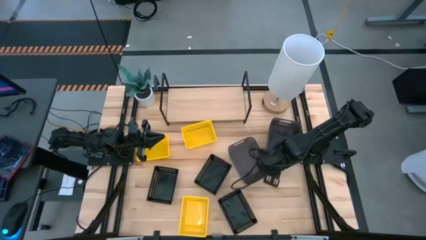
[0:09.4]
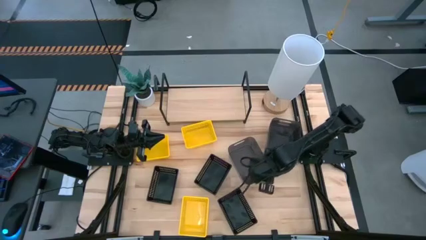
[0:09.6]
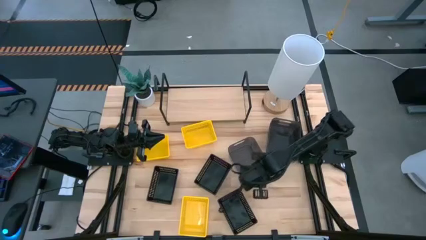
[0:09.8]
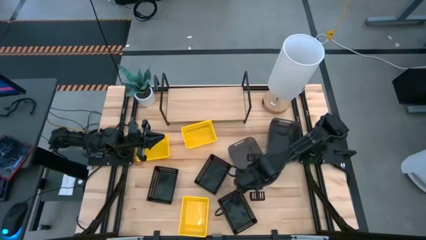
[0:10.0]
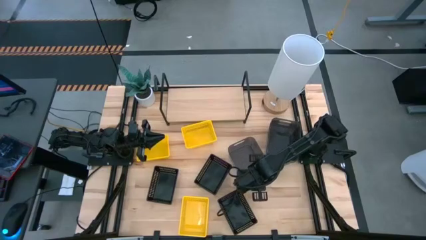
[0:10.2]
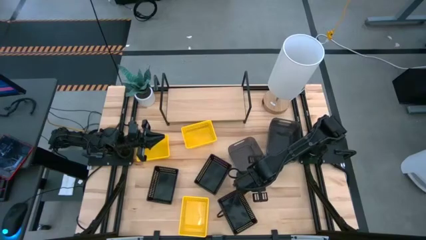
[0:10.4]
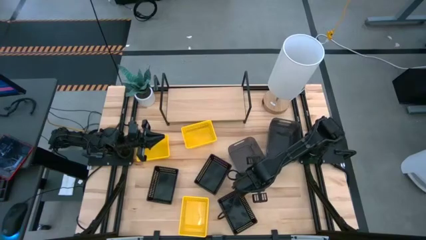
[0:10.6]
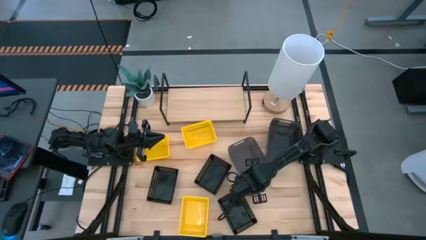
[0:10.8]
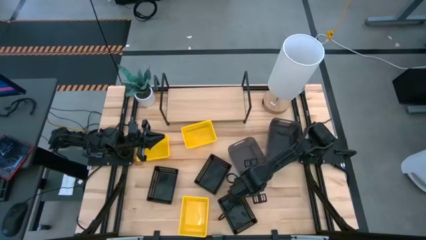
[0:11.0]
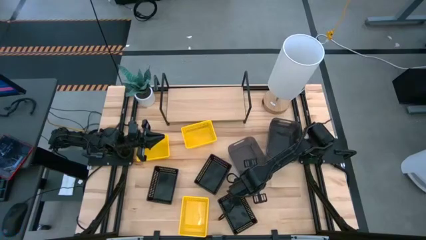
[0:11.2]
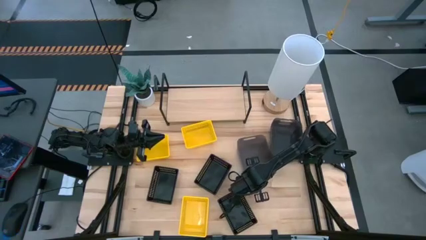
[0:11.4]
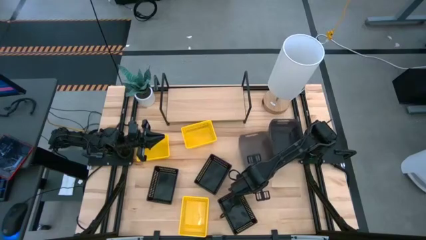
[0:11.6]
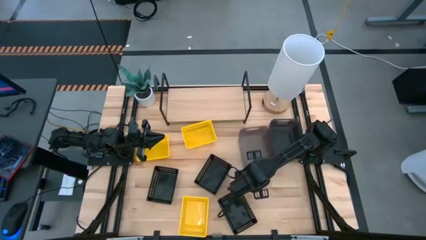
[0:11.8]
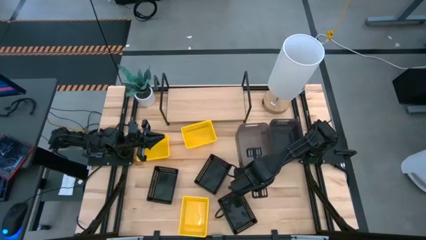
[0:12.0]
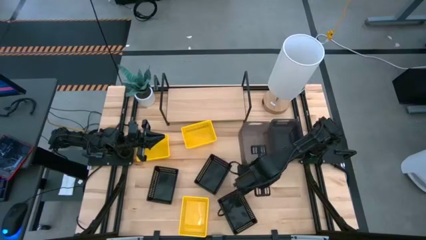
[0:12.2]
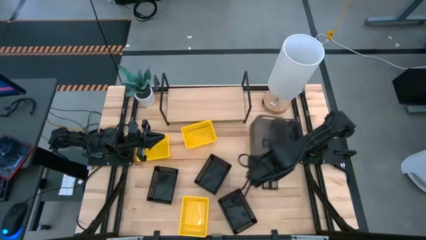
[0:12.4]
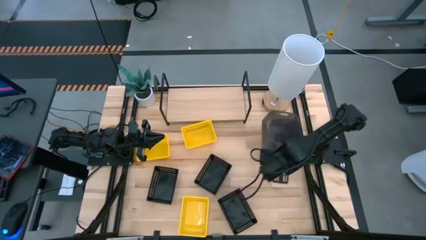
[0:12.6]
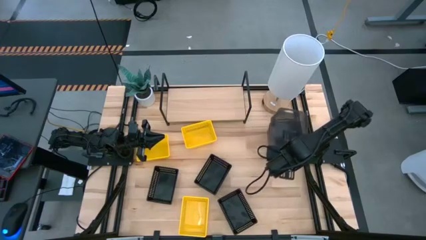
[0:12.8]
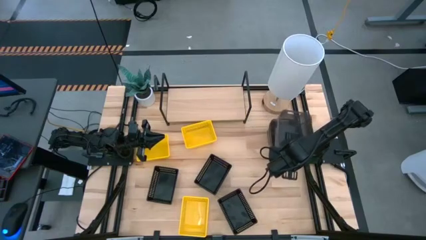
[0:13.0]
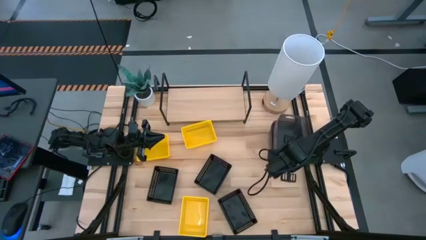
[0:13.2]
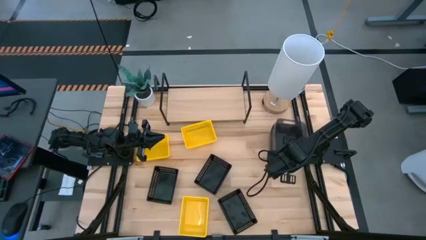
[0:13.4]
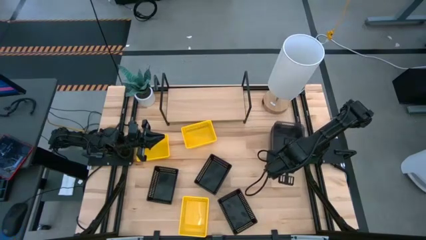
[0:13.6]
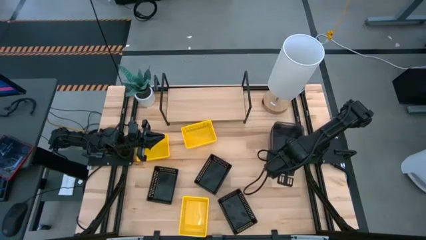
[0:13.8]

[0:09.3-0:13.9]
Task: Stack baskets on shelf by color
Stack the bottom gray bin on the gray bin

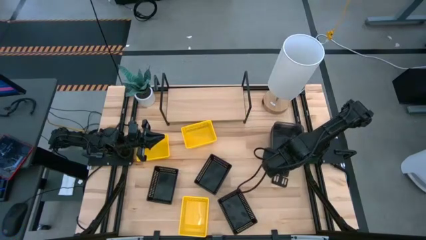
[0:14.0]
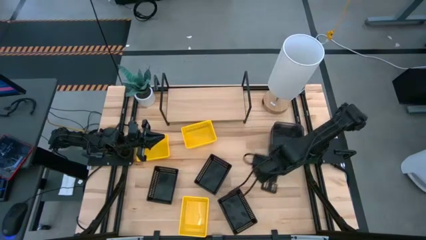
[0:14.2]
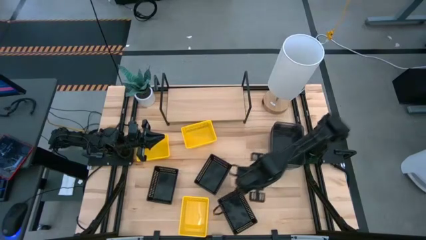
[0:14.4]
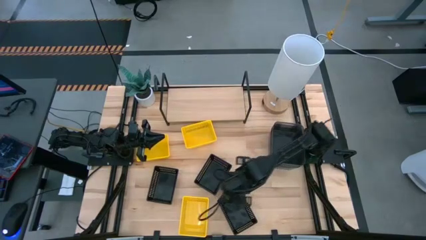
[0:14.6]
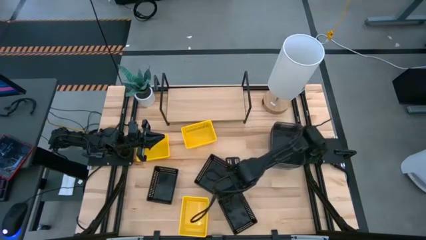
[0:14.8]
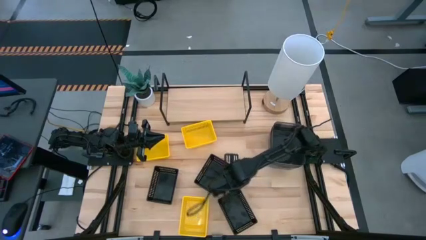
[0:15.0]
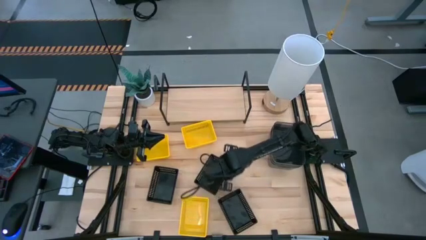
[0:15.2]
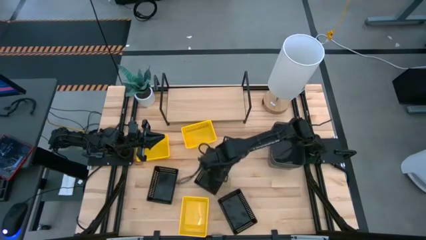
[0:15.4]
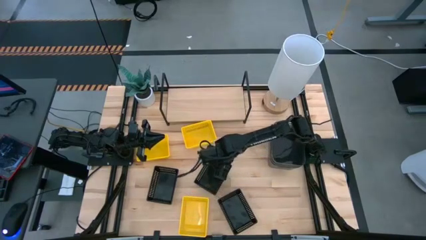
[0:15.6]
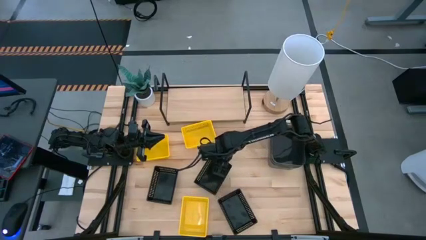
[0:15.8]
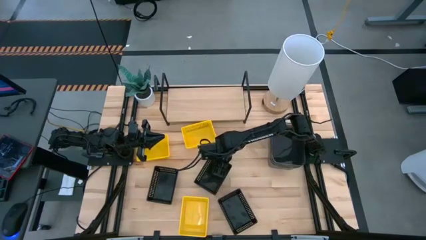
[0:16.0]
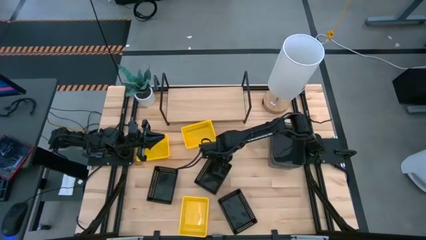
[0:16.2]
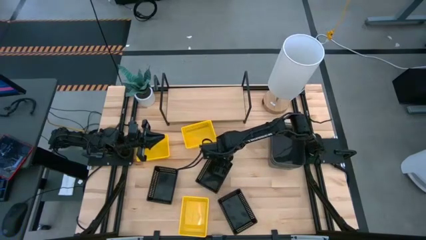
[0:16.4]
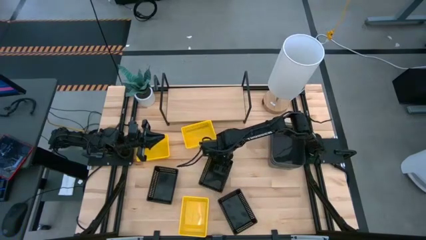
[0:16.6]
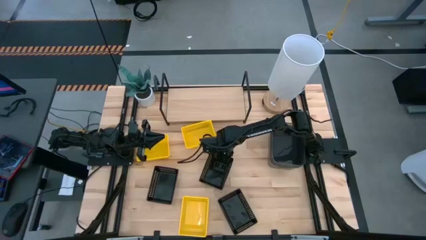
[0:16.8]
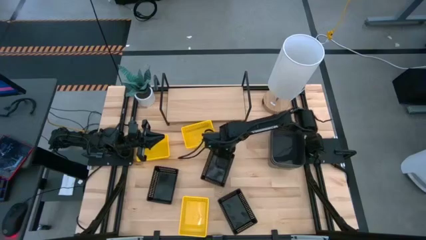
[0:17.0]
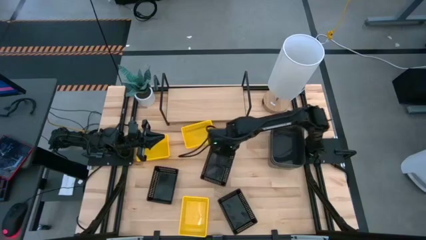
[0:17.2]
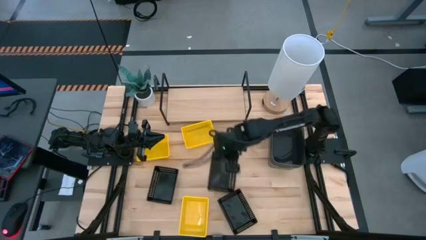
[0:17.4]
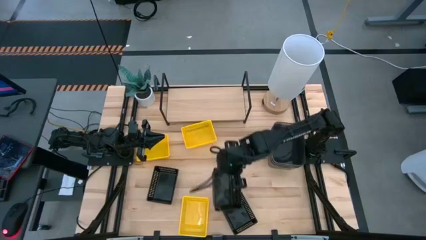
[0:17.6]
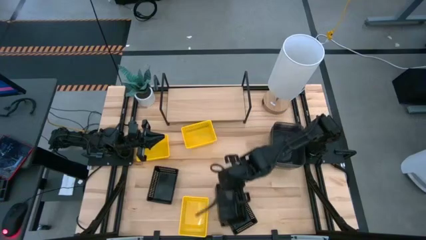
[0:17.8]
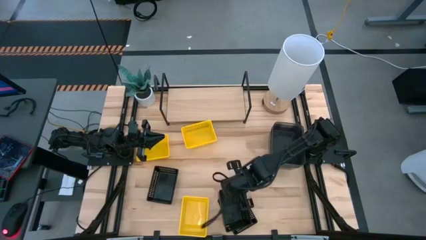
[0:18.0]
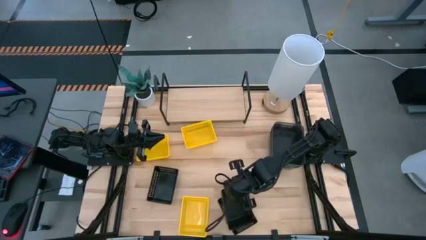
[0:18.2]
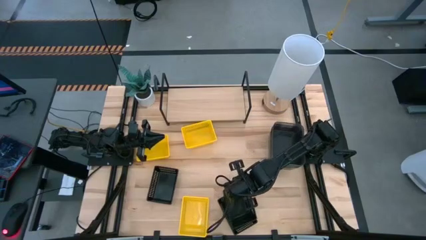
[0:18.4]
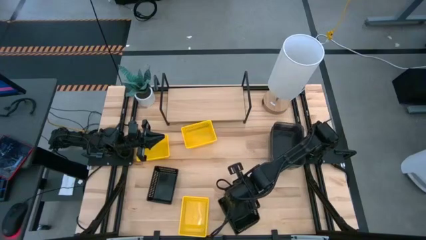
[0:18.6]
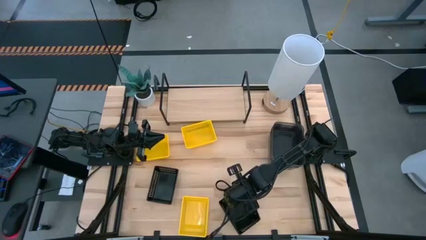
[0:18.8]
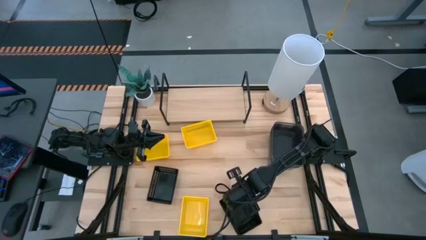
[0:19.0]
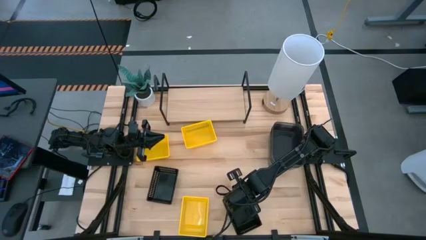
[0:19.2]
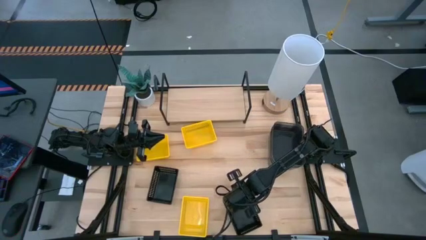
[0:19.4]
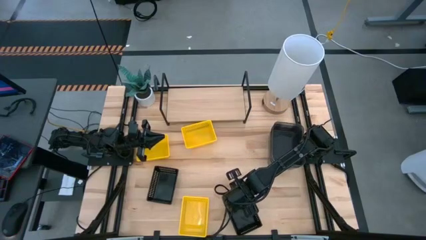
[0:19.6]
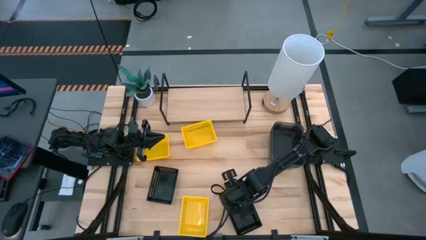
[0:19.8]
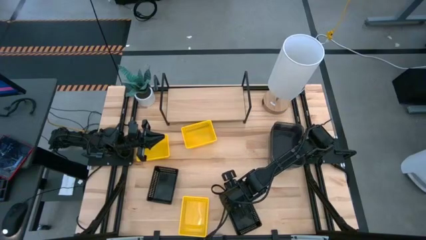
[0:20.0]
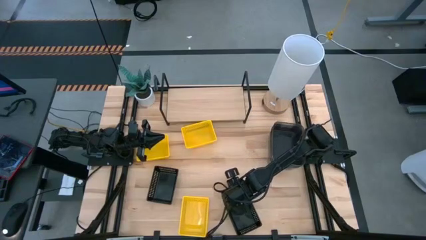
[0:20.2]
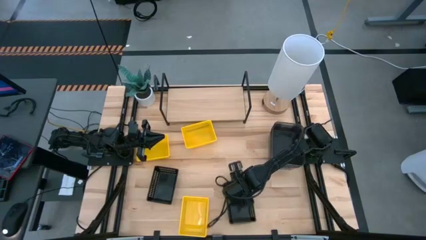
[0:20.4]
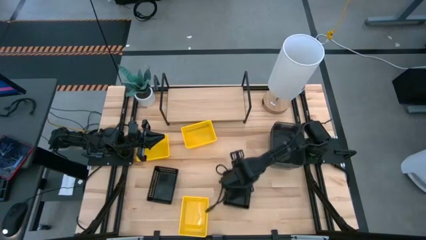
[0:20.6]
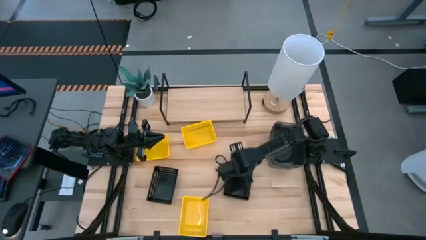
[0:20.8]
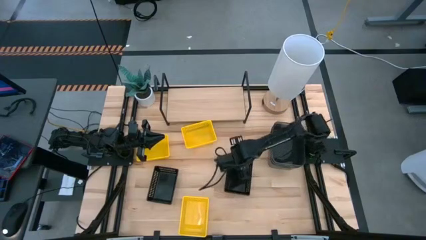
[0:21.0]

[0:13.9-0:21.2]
Stack the top right black bin on the bottom black bin

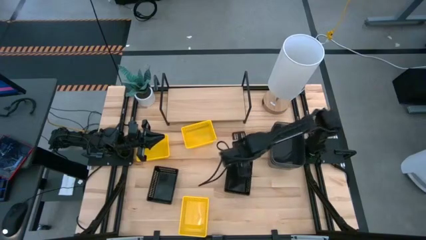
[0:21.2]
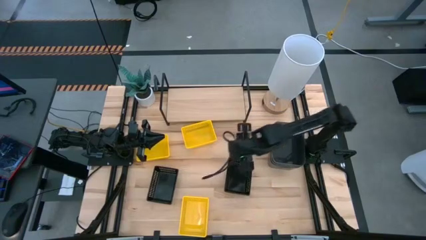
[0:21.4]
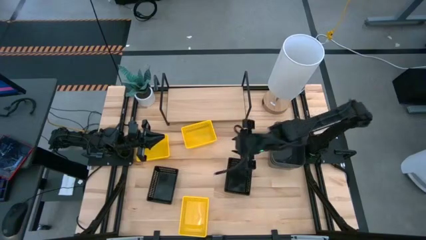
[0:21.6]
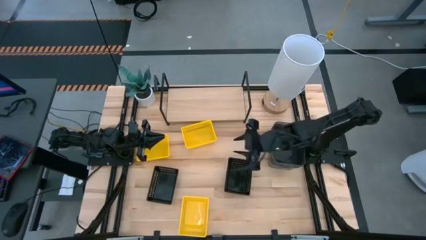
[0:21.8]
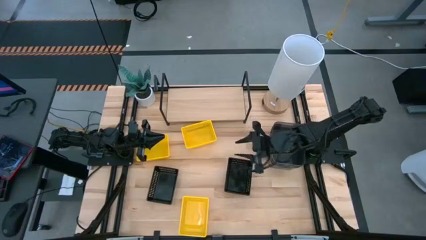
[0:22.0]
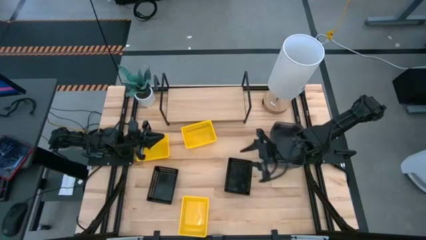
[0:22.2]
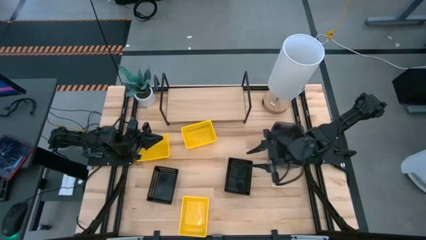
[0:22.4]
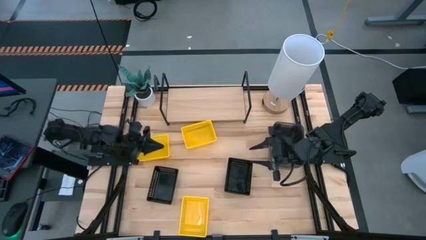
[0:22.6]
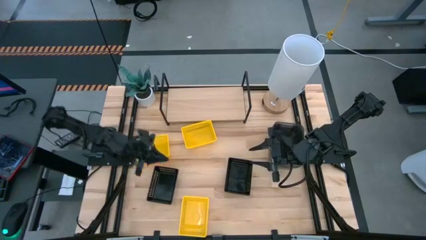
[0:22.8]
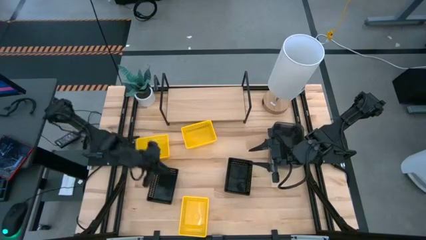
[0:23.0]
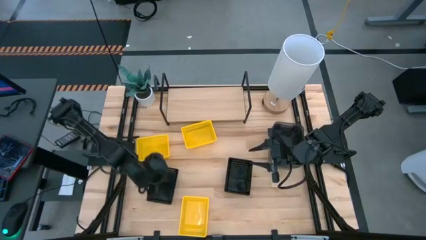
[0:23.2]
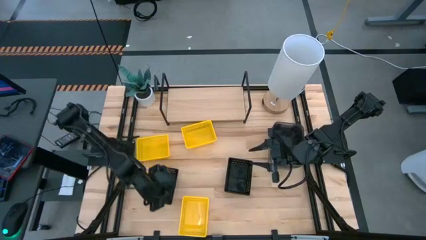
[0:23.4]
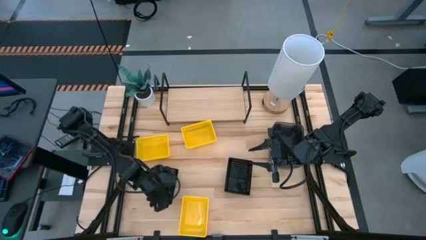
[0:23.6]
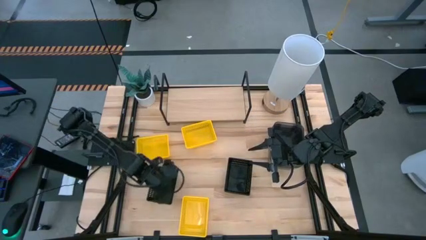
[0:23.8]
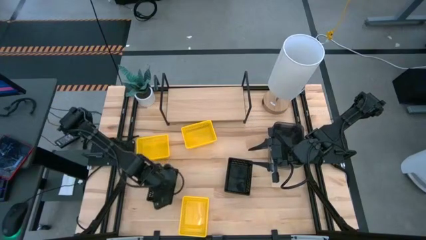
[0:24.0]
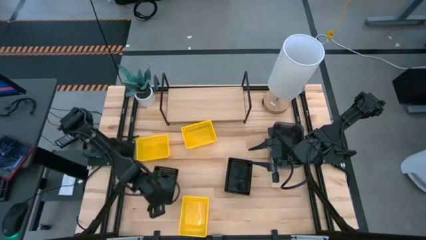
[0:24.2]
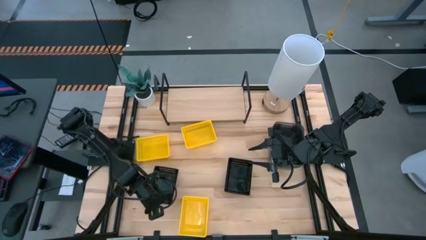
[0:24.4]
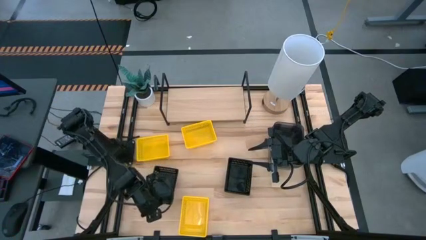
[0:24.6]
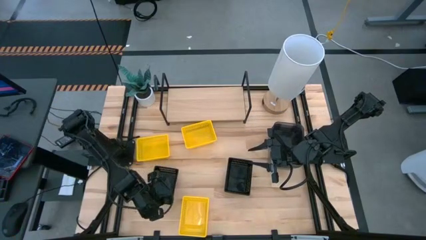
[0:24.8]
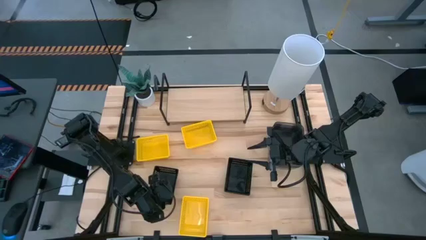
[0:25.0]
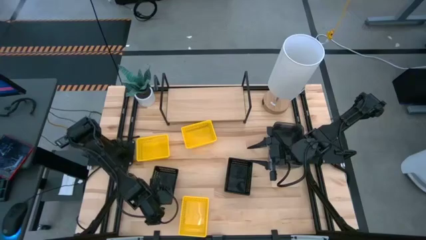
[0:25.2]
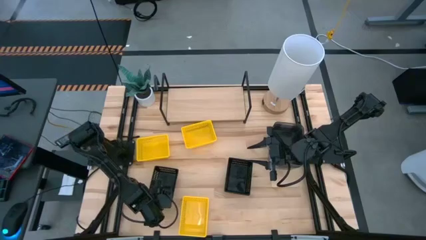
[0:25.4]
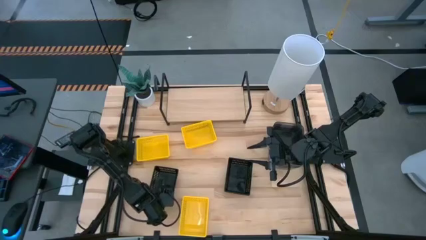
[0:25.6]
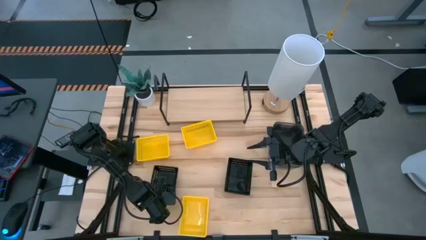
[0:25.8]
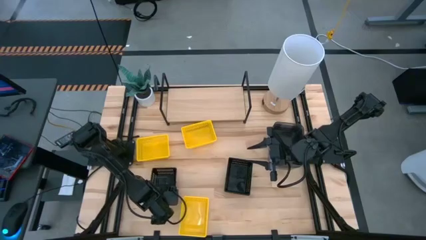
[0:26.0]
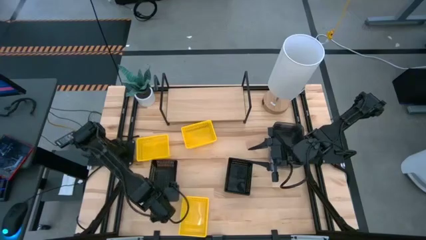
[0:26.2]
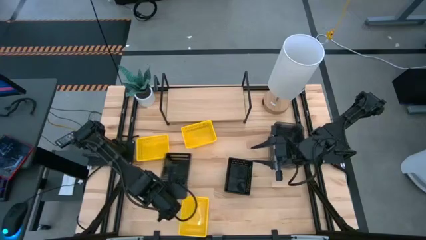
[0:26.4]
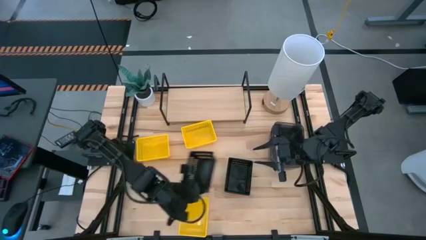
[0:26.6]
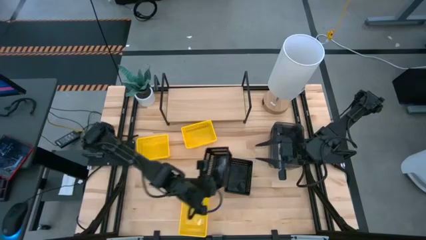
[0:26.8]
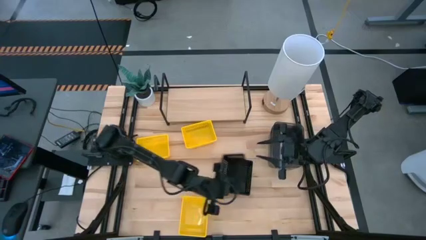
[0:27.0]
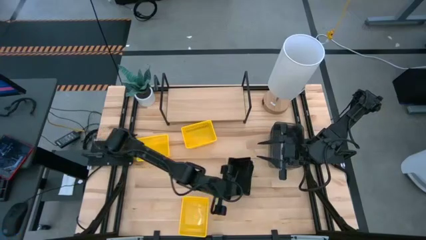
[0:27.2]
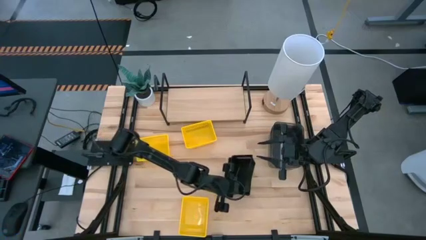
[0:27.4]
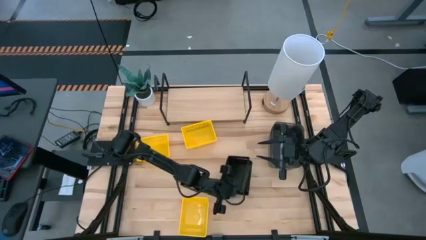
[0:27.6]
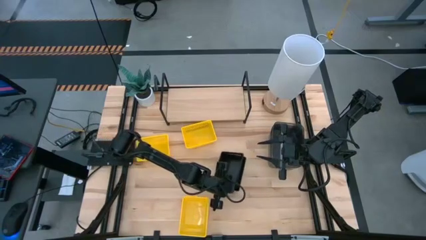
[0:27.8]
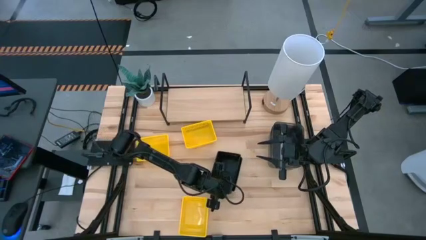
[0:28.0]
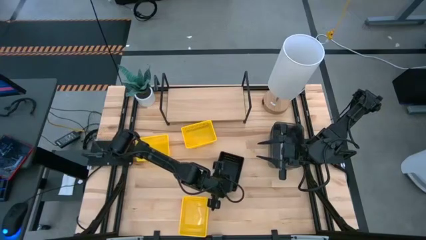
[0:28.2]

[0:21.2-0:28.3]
Stack the left black bin on the black bin
